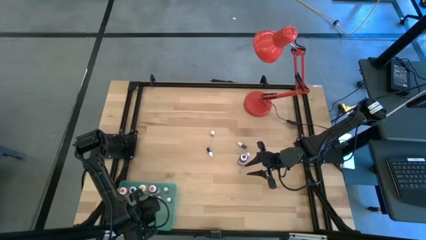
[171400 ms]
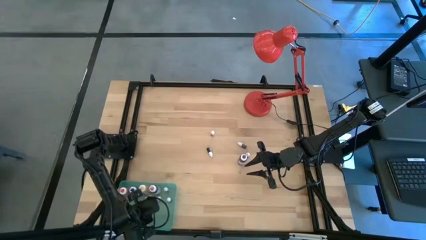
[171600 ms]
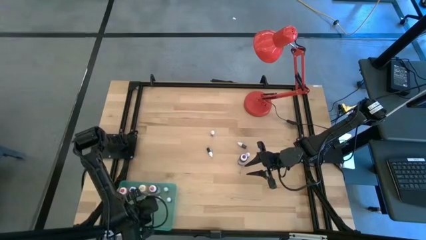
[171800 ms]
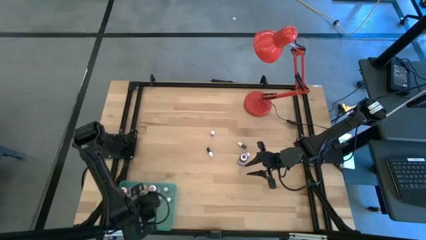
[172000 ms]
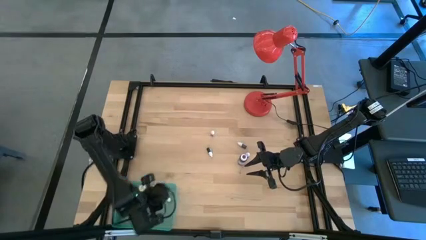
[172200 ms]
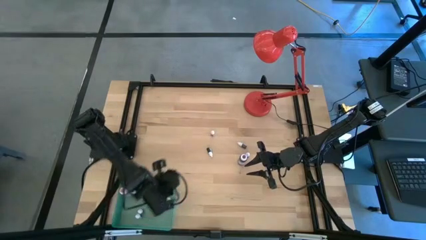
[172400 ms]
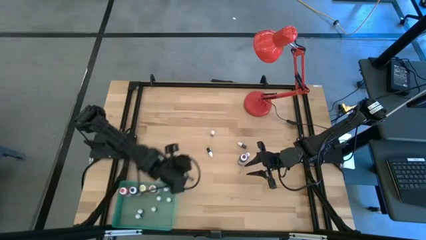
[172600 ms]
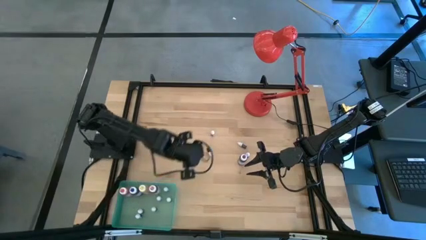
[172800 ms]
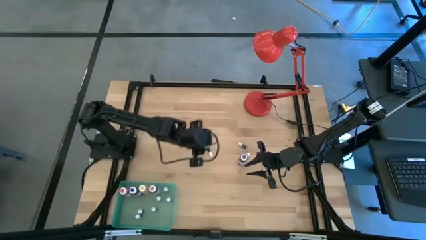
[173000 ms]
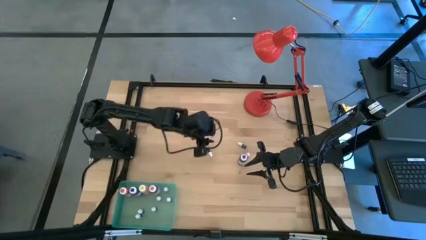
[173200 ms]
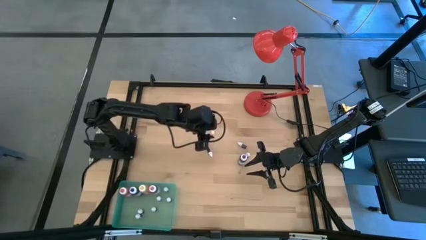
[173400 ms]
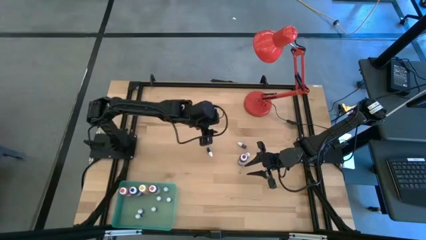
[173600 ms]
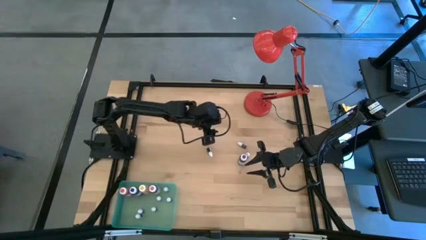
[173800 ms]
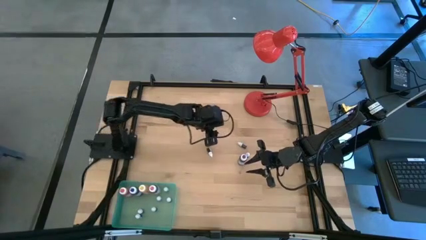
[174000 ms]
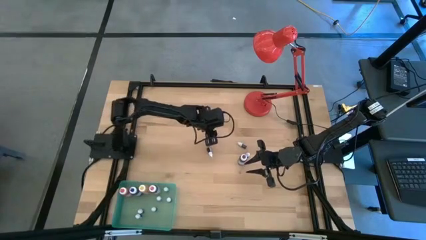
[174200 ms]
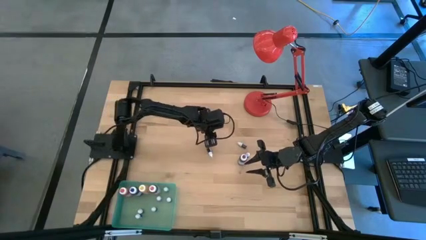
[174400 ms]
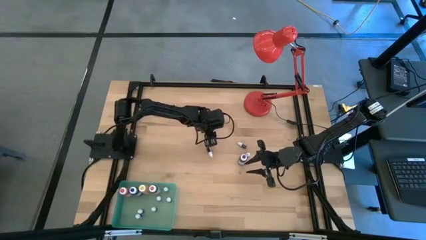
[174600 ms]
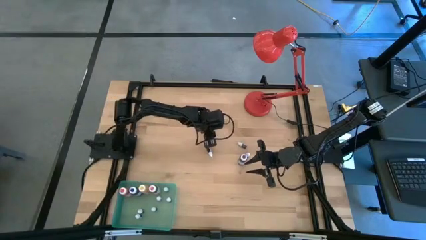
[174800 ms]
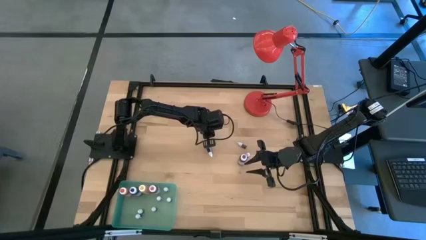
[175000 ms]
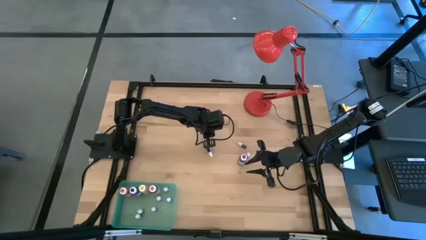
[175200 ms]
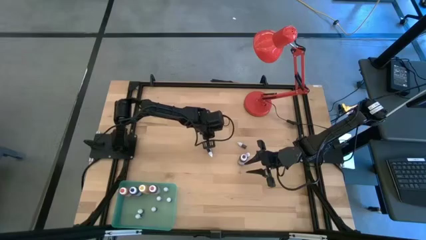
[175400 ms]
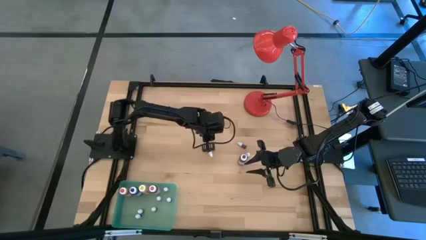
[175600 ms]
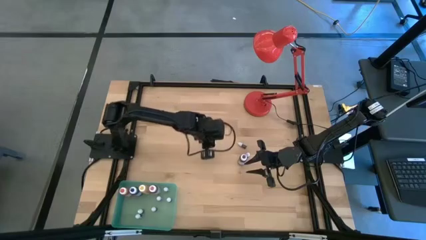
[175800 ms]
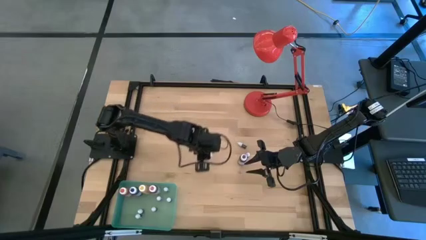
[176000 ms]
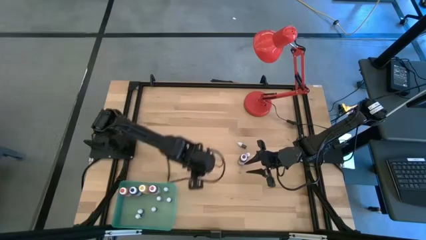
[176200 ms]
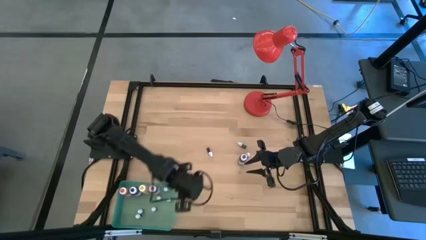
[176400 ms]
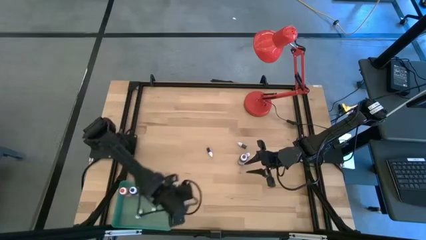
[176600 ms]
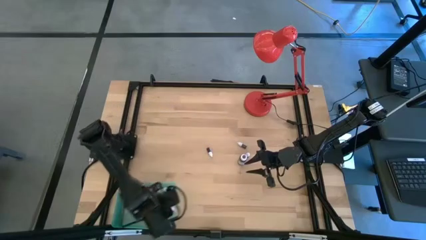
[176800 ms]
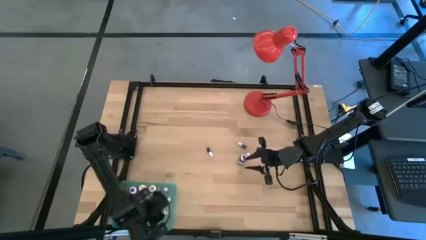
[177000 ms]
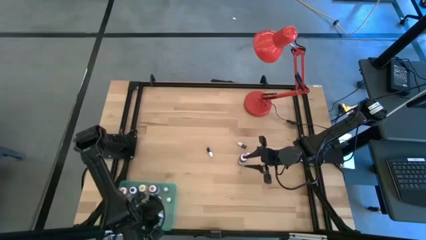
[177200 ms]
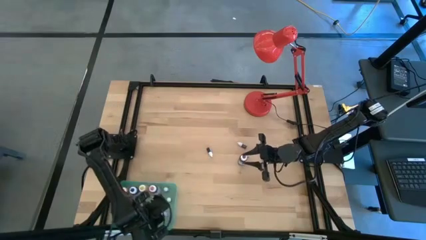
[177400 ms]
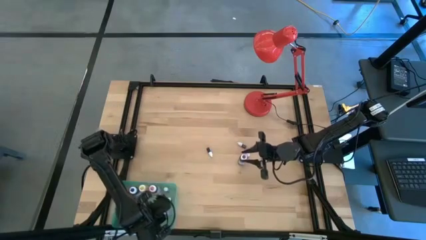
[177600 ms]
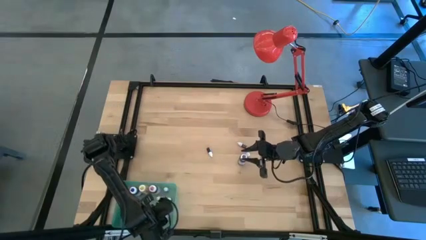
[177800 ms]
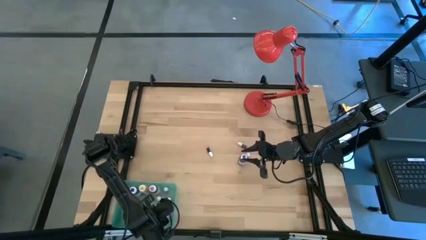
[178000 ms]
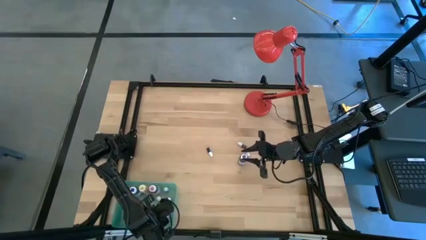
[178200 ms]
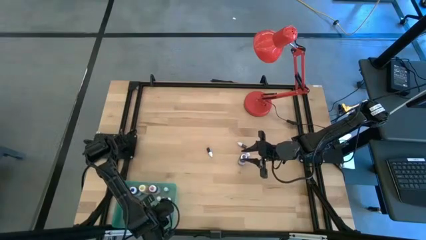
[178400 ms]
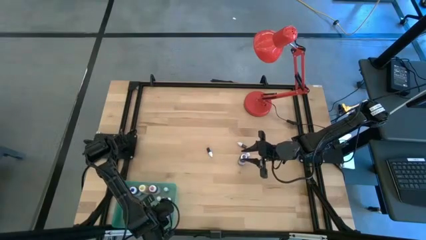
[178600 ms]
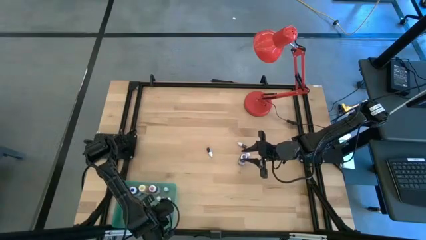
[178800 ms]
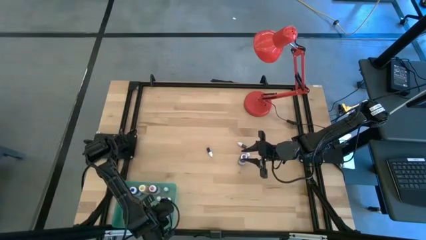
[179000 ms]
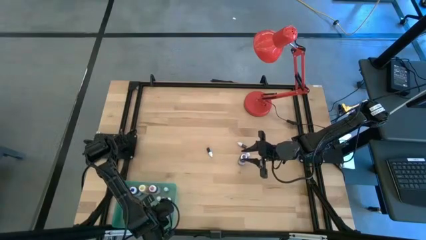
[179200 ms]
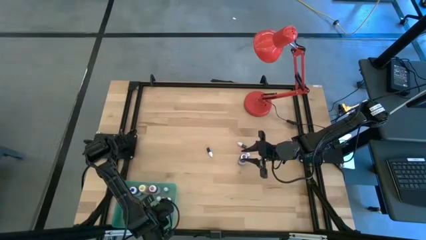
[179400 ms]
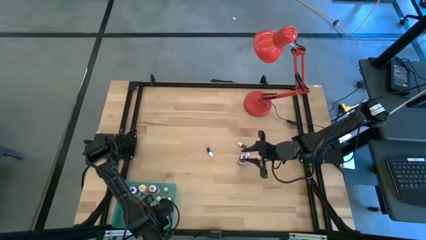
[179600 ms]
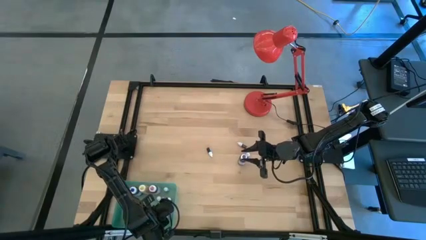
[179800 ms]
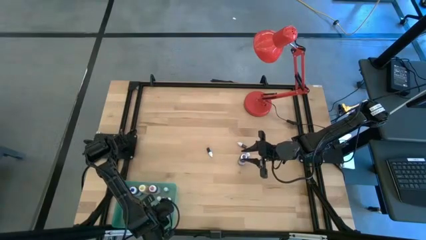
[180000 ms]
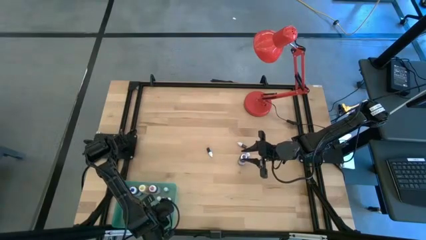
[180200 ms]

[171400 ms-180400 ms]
Task: Pick & Place food coloring
Put the pink food coloring into the blue bin

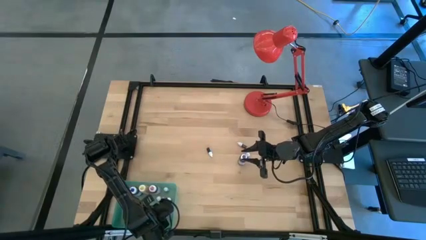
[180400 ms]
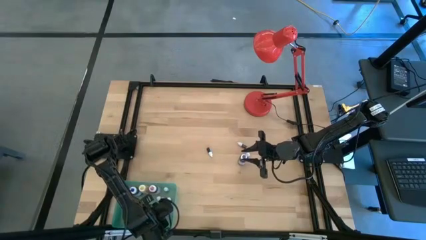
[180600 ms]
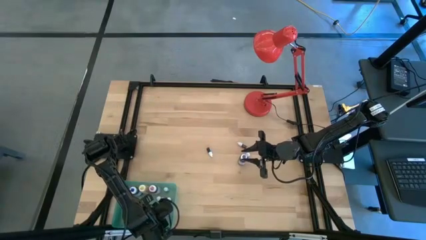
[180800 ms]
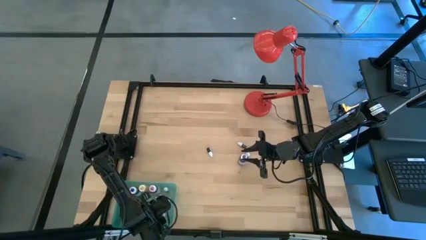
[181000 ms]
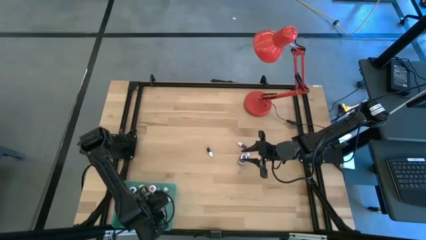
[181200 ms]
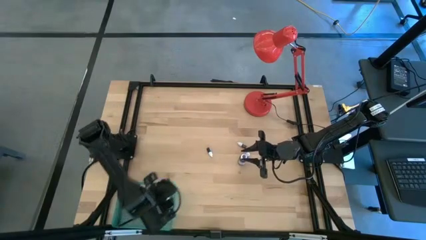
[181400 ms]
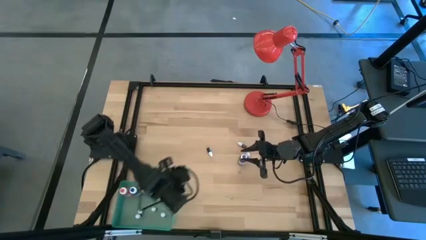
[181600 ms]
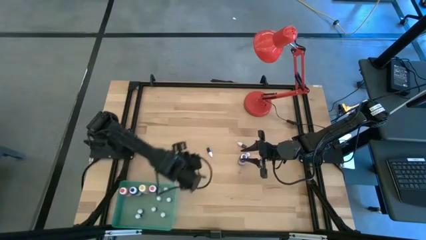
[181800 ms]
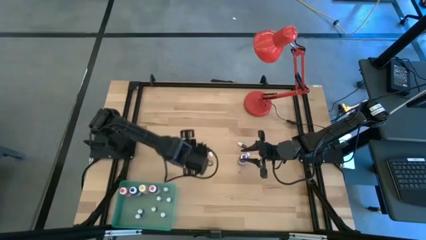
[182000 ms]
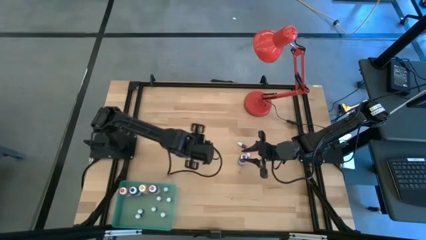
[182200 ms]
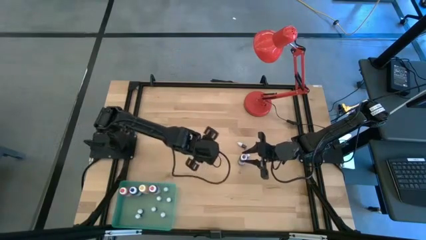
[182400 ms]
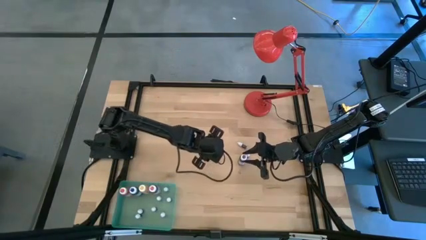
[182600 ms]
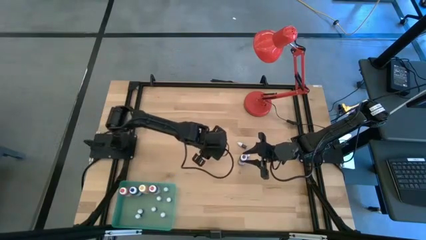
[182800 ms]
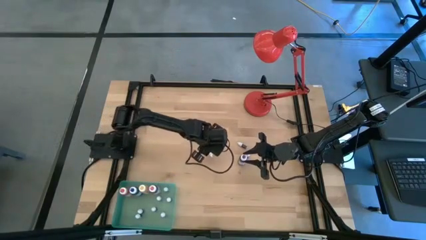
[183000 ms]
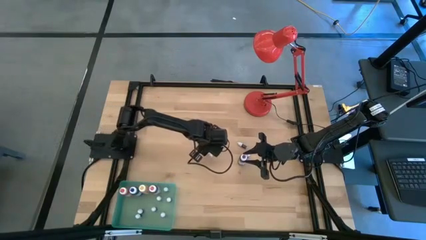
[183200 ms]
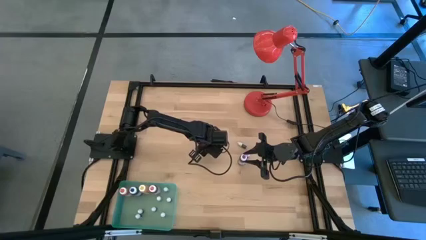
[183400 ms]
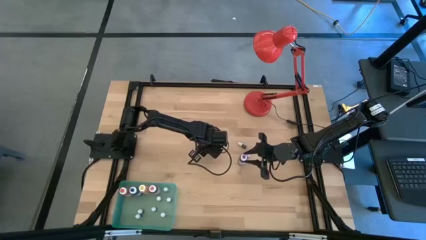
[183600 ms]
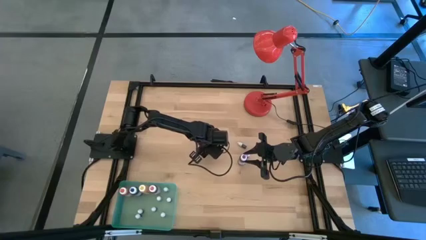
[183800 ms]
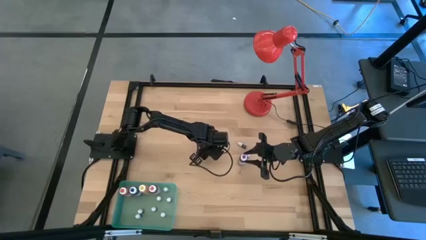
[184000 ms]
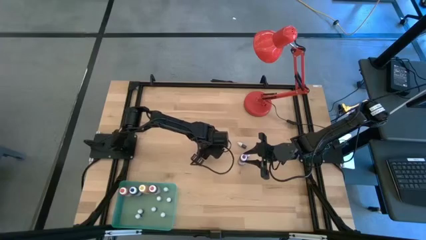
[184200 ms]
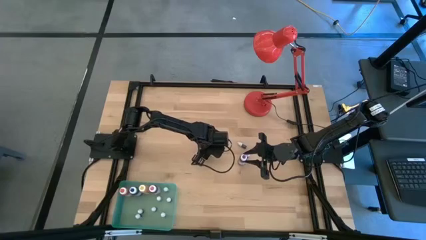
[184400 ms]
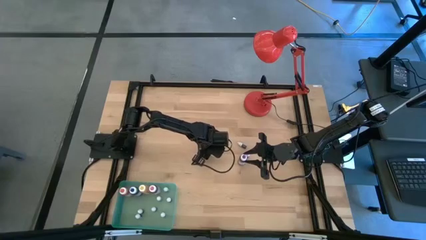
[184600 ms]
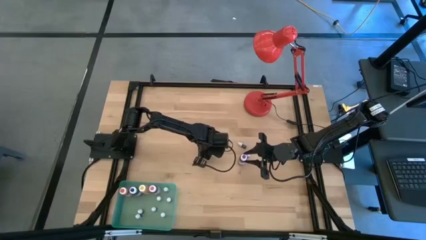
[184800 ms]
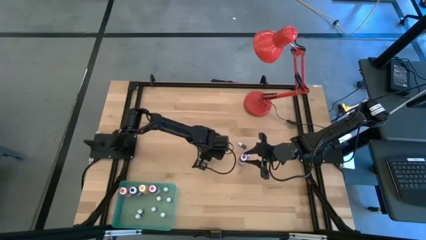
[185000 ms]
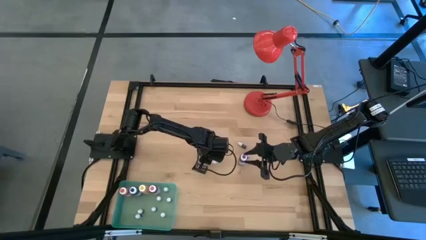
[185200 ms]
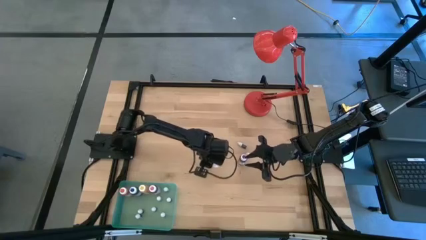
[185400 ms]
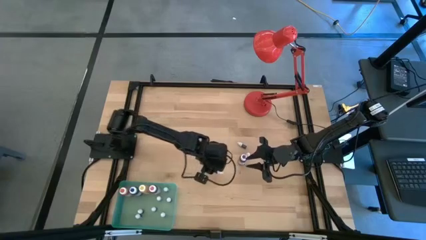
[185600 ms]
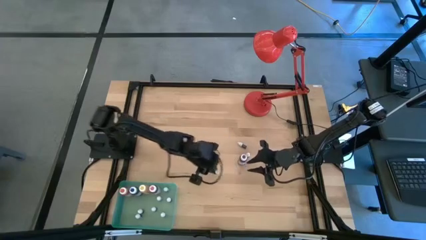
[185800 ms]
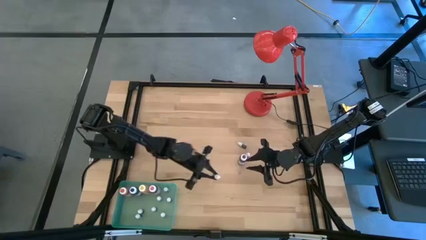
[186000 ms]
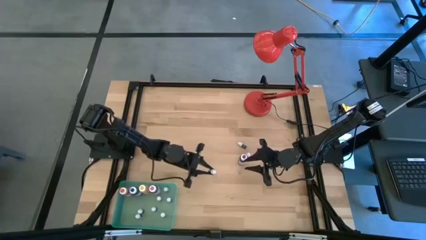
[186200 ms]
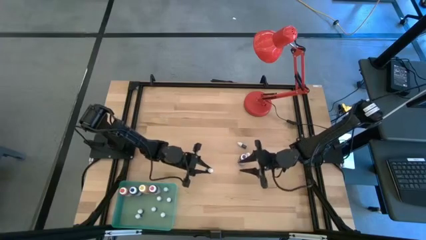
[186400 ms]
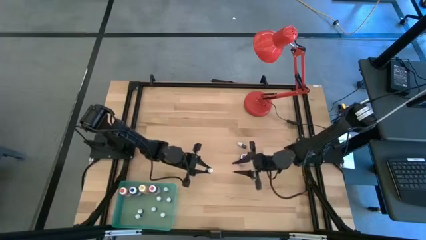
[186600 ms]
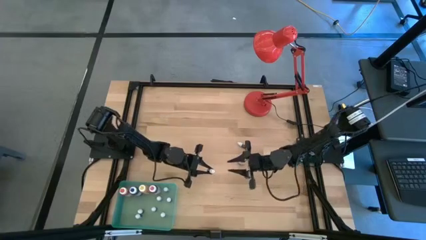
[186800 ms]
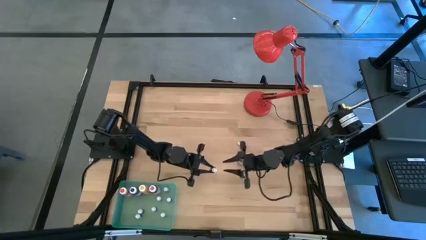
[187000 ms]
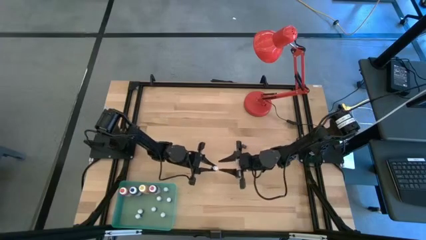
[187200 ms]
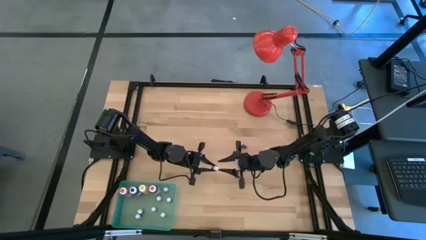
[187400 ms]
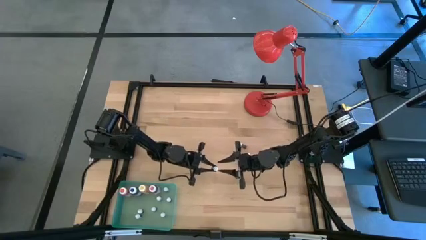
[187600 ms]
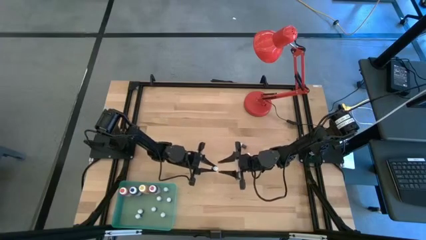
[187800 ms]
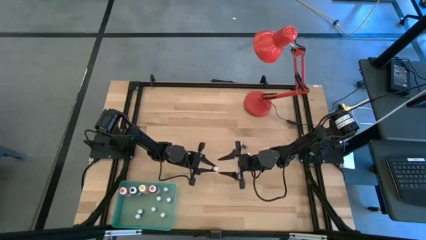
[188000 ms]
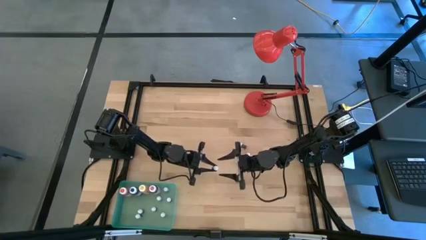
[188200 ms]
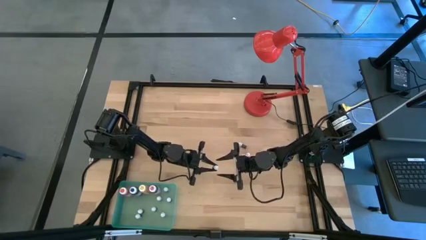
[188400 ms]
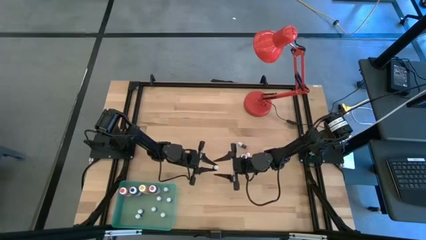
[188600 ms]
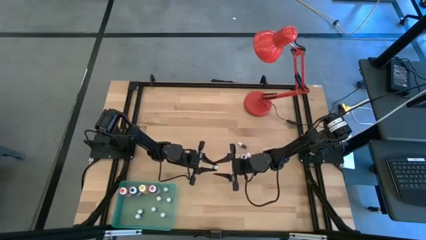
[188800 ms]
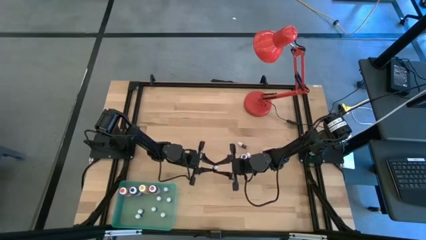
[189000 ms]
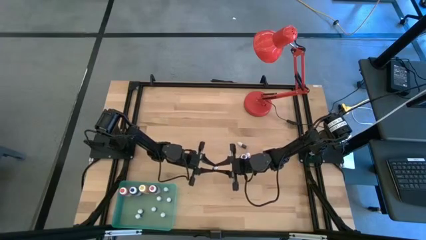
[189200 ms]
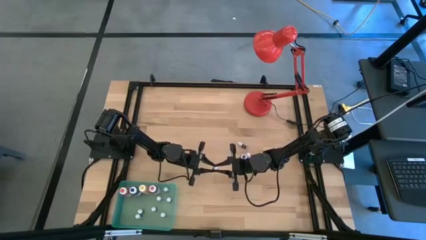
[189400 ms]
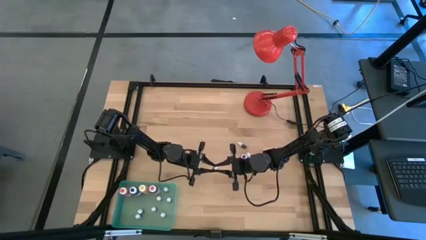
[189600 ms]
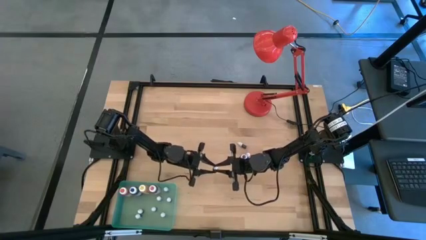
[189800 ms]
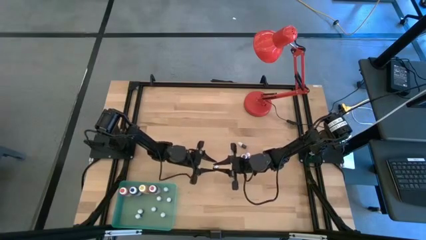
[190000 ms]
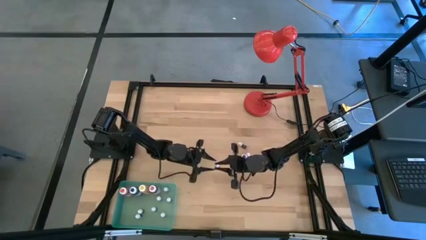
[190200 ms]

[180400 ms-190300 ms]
Put the green food coloring into the blue bin
